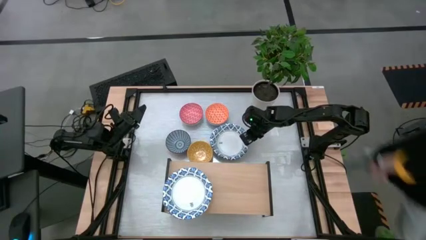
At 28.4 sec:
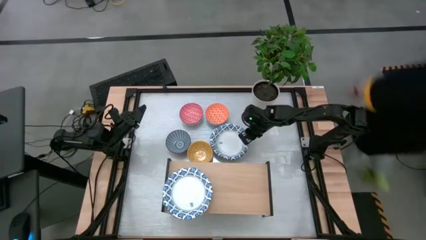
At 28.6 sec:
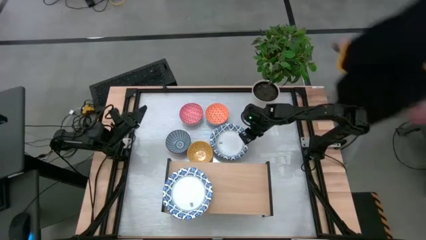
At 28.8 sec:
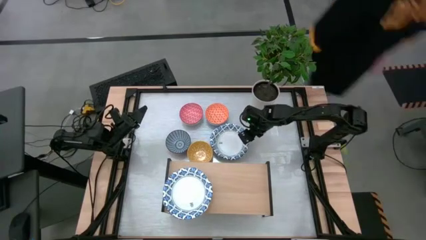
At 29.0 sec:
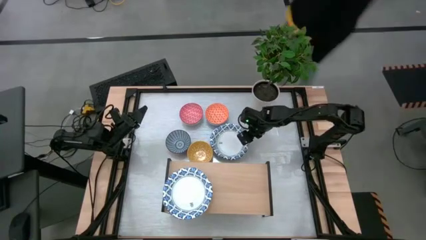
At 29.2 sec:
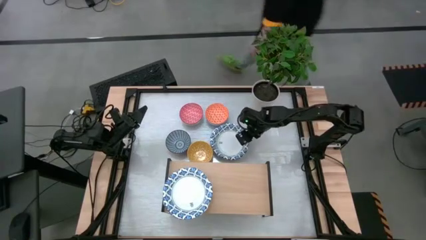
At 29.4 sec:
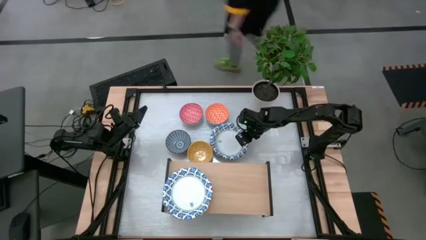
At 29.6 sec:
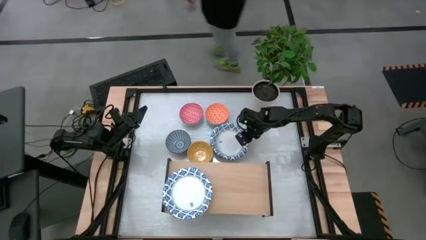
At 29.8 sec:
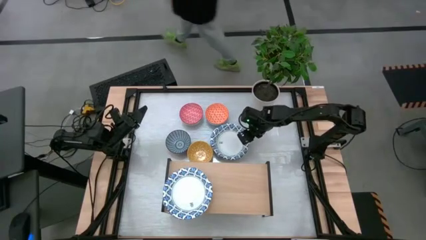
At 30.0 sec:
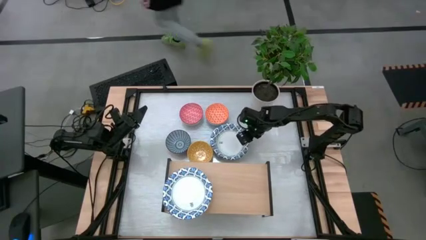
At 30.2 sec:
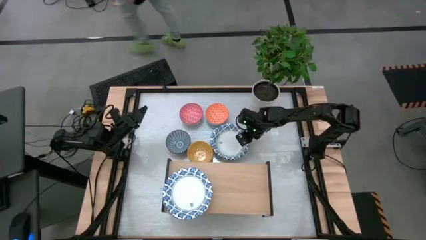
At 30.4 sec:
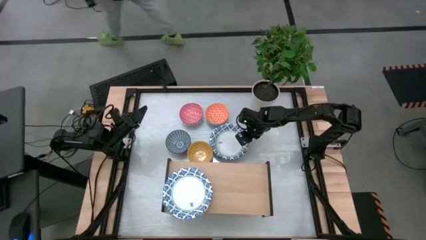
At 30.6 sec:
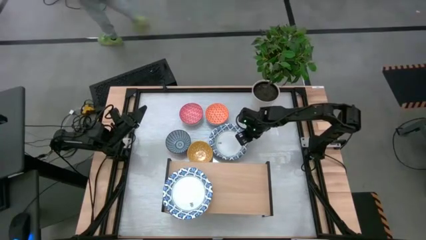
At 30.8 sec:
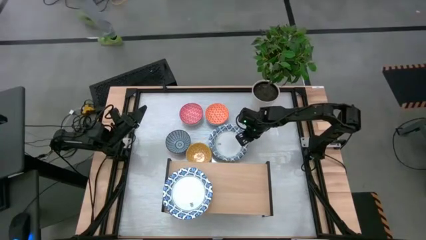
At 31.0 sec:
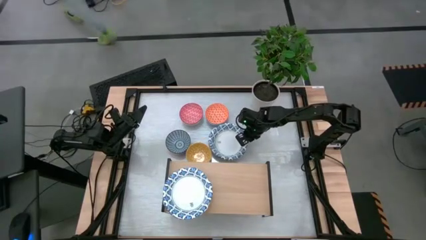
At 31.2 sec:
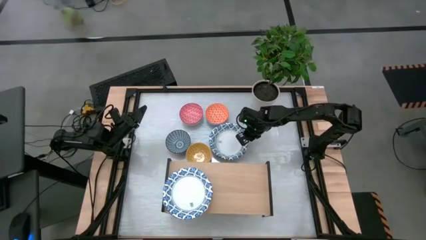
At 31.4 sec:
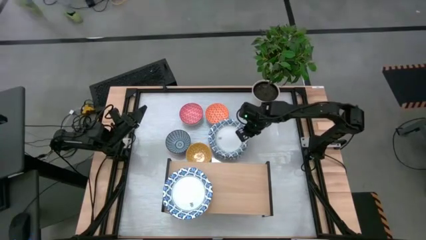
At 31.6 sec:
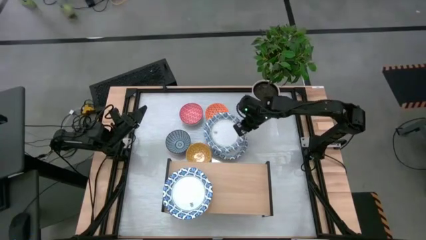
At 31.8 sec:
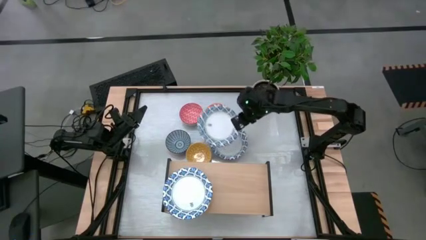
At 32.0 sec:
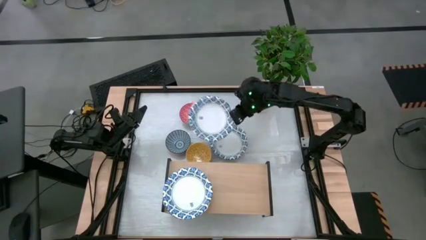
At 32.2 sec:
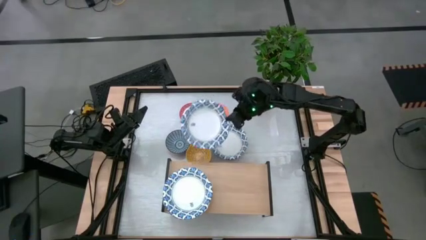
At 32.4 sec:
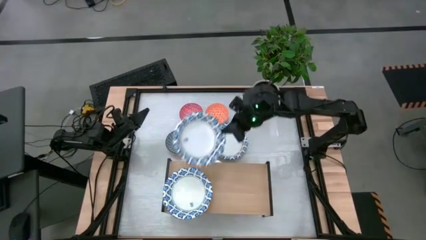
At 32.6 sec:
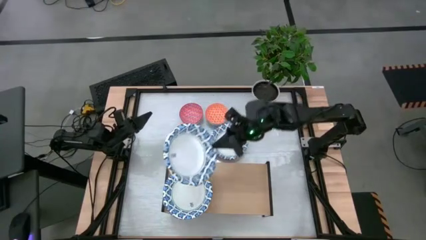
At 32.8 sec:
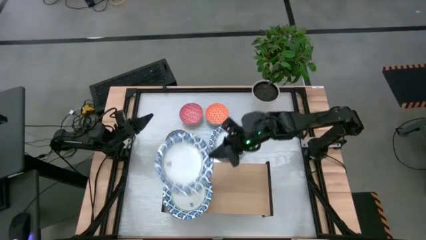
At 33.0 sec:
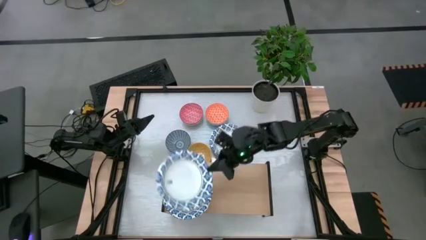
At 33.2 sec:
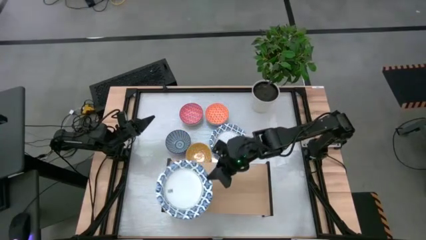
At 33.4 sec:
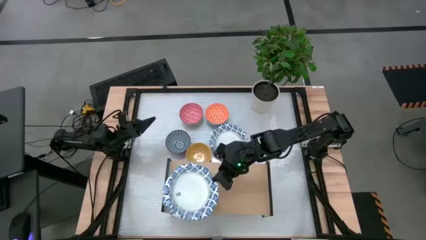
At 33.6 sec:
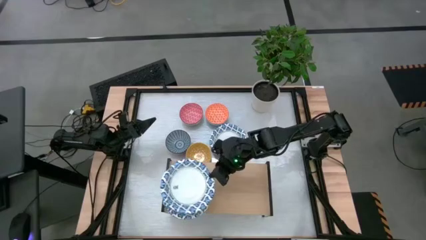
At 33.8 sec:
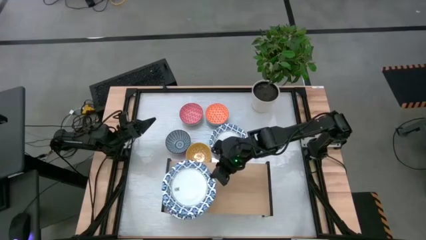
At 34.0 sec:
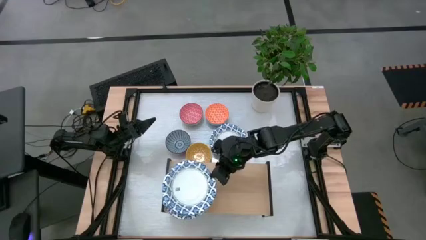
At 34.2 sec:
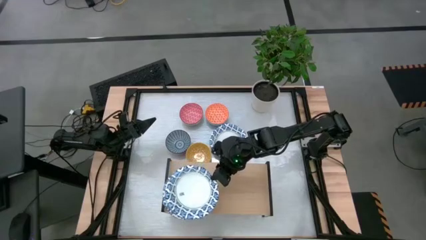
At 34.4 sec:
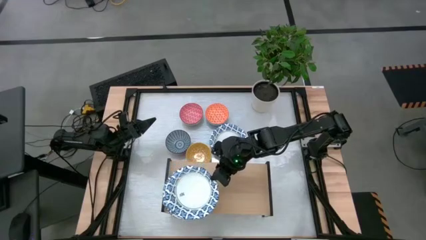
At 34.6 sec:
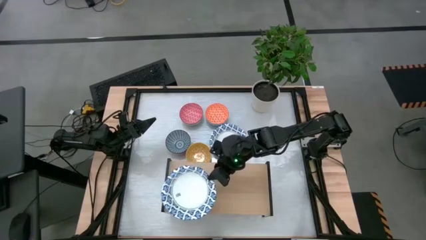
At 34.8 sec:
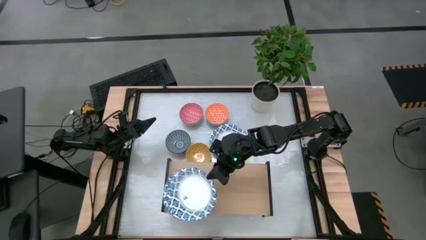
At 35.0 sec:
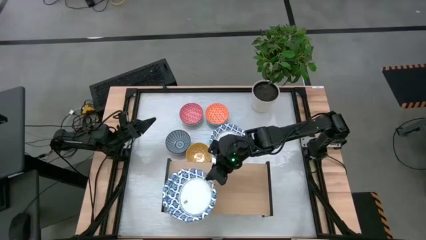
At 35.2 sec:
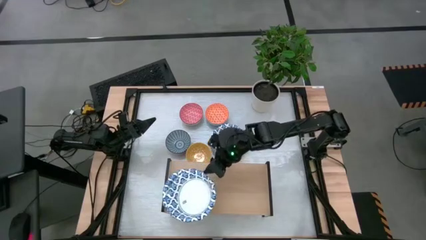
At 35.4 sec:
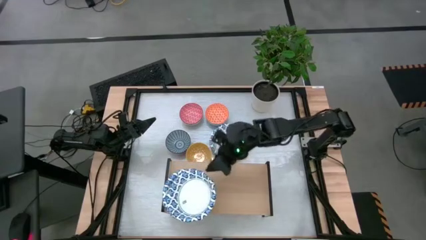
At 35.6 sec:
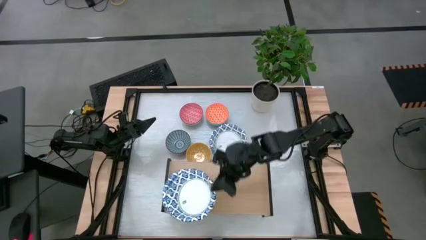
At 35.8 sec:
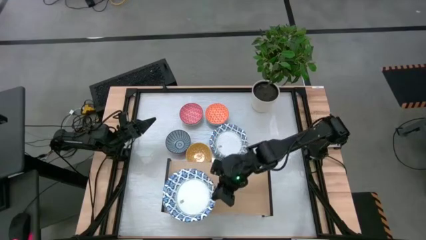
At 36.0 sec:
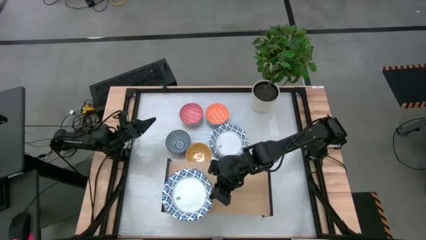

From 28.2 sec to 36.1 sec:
Task: Place and stack bowls onto a shelf
Stack the white patterned bowl on top of the other white patterned bowls on the shelf

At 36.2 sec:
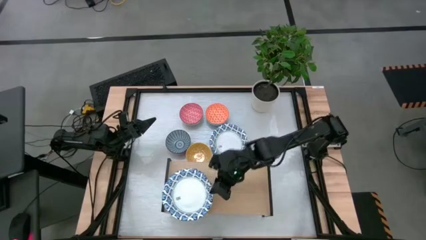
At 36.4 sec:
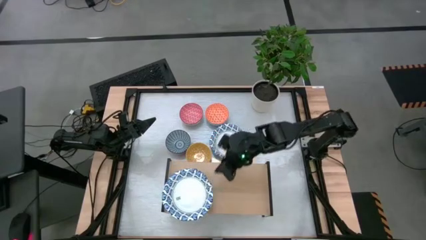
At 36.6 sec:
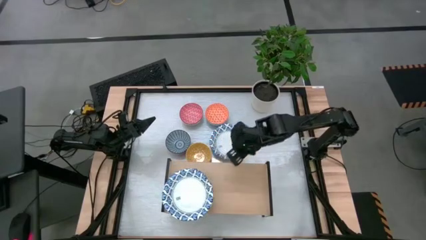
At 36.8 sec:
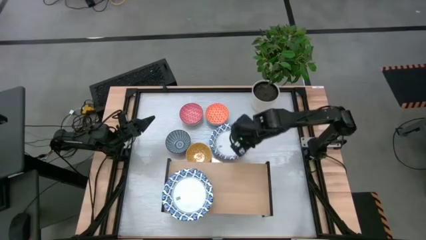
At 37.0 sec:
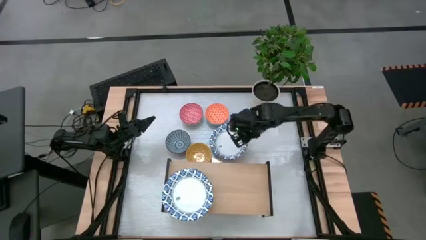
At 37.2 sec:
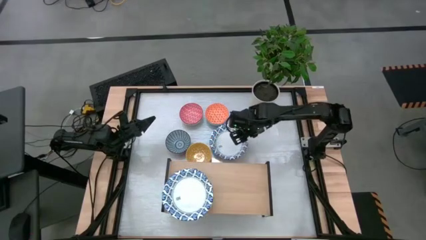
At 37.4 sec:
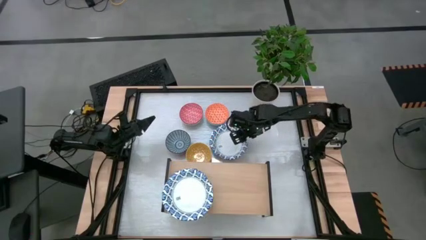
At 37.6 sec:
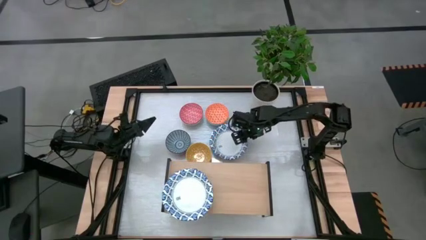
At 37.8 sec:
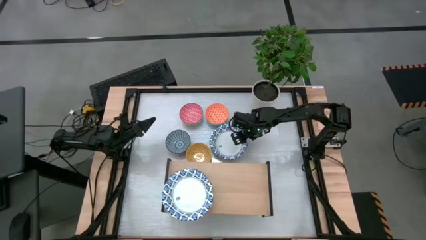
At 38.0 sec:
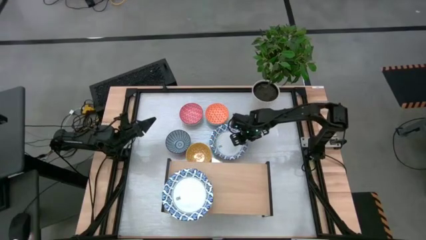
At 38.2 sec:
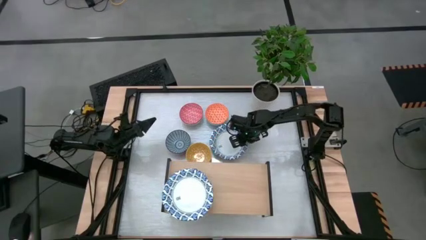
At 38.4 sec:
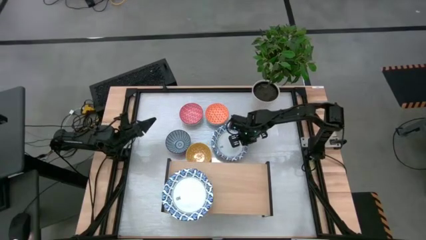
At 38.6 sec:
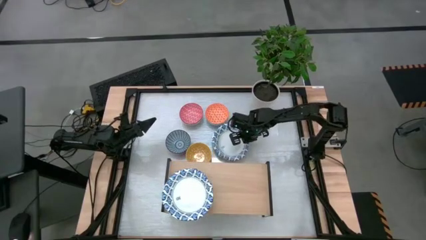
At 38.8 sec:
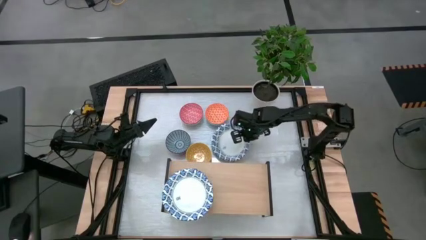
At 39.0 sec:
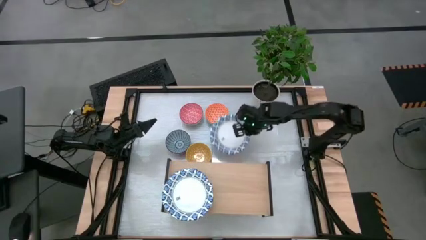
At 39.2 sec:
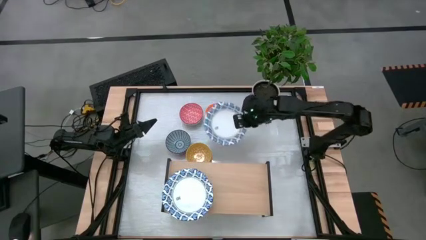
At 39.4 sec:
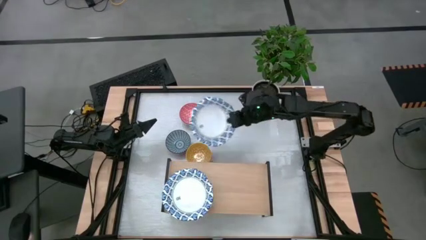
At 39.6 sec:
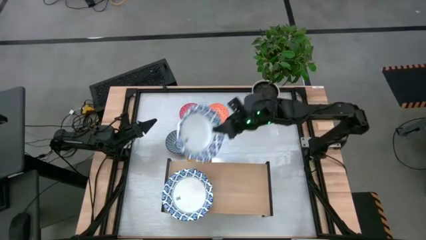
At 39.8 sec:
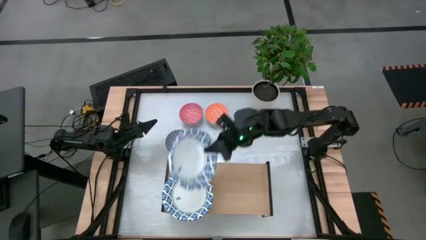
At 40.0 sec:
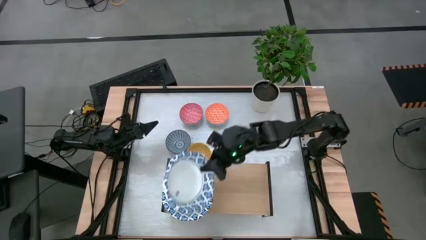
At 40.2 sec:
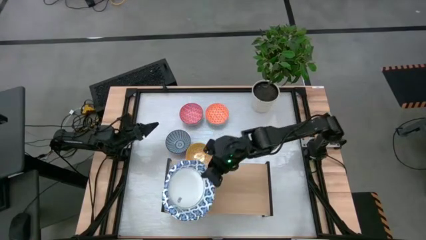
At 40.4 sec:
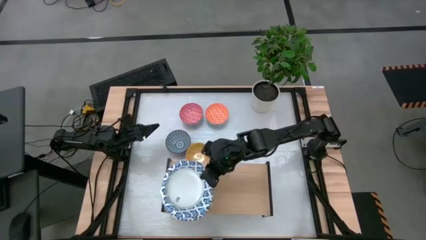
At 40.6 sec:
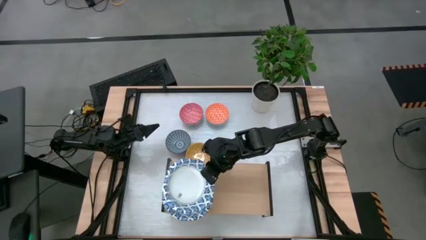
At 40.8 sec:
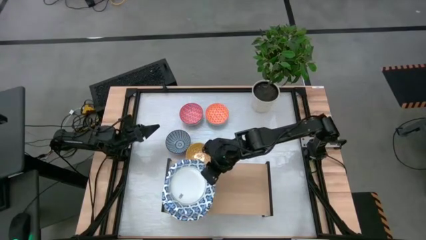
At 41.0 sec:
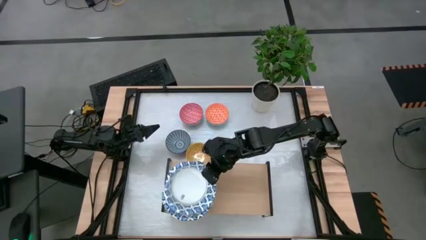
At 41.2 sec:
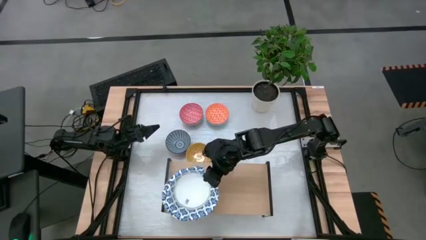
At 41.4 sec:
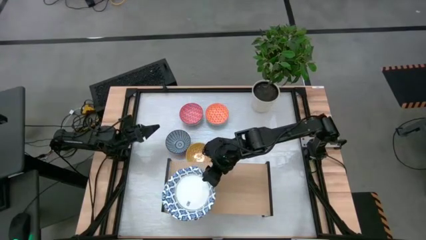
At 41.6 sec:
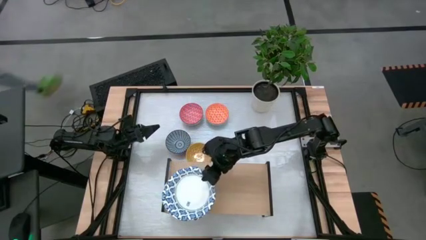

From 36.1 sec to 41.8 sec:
Stack the white patterned bowl on top of the other white patterned bowls on the shelf

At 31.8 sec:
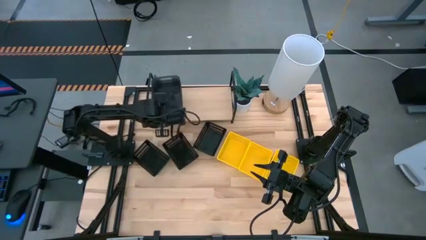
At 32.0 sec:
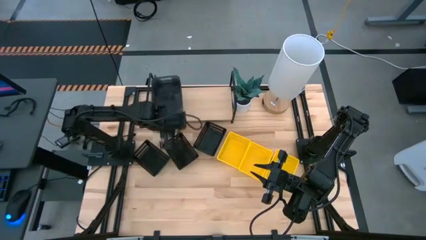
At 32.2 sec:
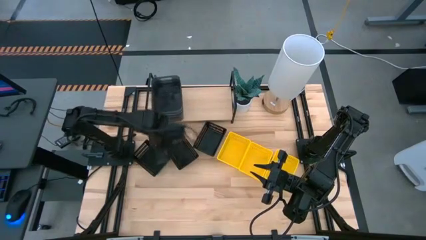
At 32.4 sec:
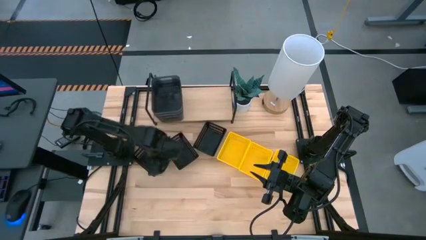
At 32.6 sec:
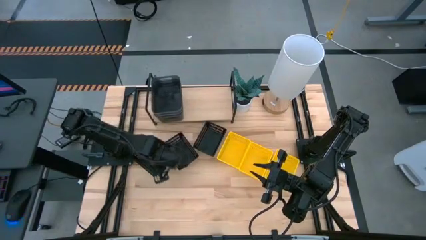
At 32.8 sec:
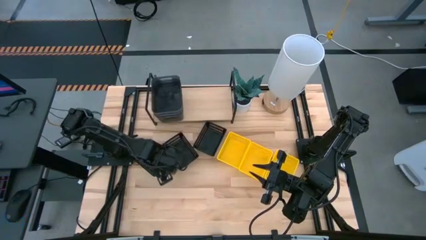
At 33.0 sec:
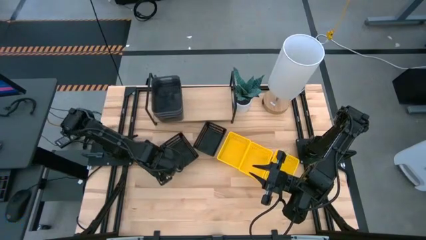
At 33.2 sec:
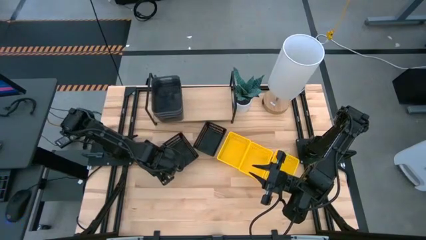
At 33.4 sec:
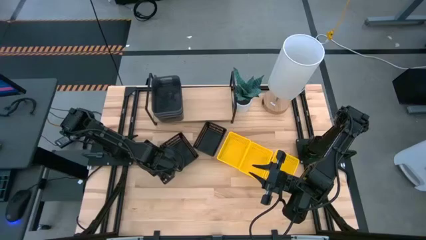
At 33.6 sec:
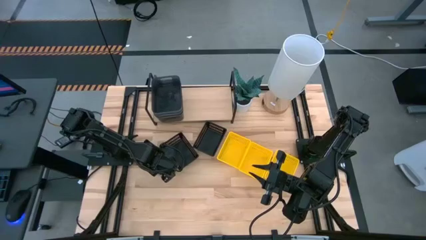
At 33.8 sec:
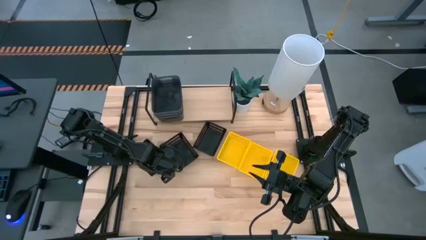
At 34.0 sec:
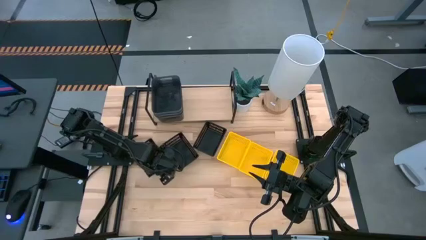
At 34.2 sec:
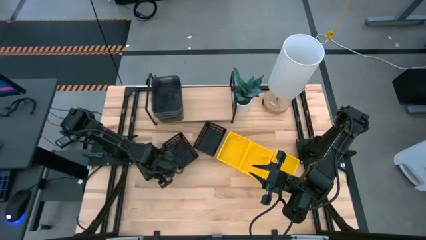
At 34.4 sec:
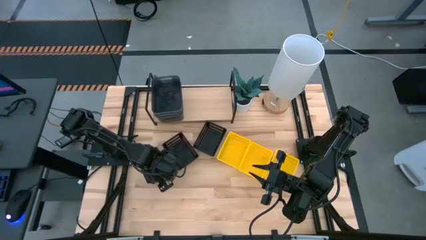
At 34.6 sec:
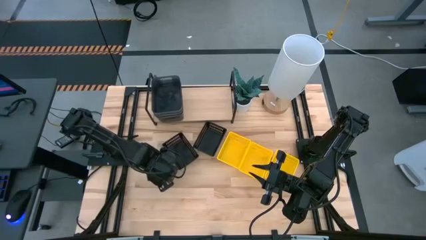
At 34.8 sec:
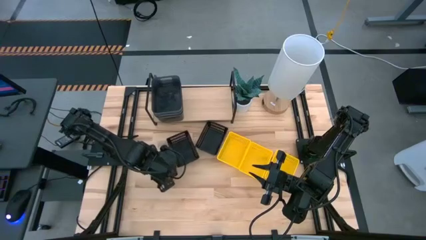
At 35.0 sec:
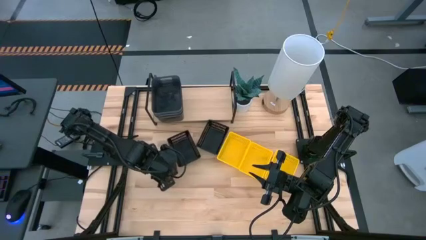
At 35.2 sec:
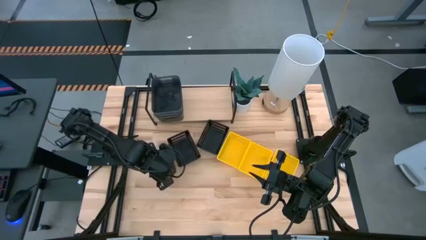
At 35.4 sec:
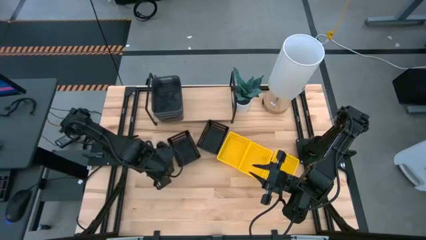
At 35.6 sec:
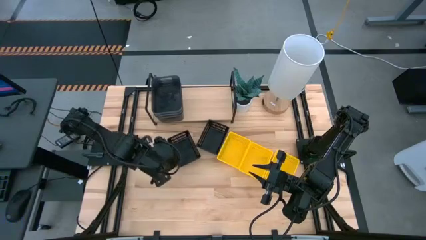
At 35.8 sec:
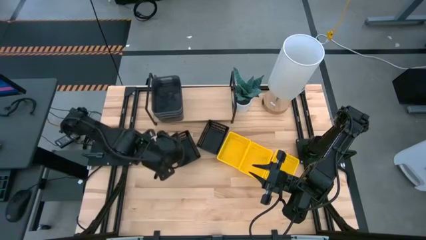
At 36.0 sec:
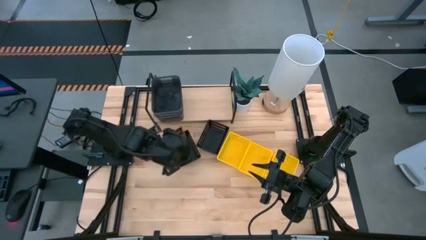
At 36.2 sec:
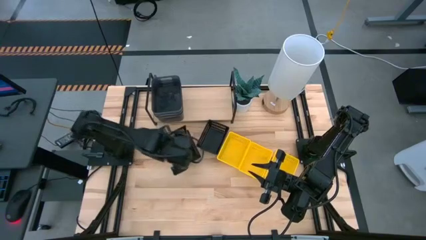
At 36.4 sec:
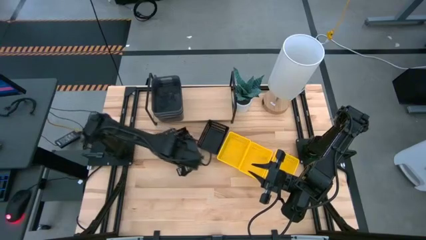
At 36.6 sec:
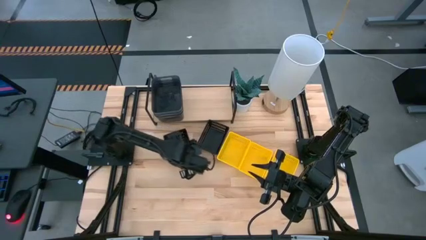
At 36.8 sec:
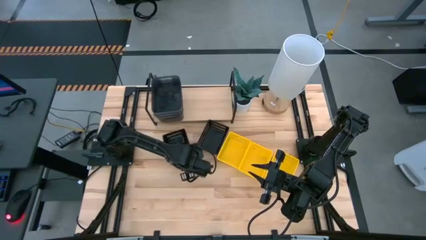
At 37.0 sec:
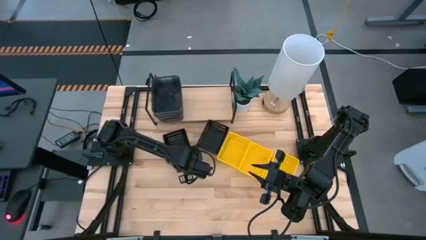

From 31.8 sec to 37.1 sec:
Task: Stack baskets on shelf by color
Stack the left black basket on top of the middle black basket
